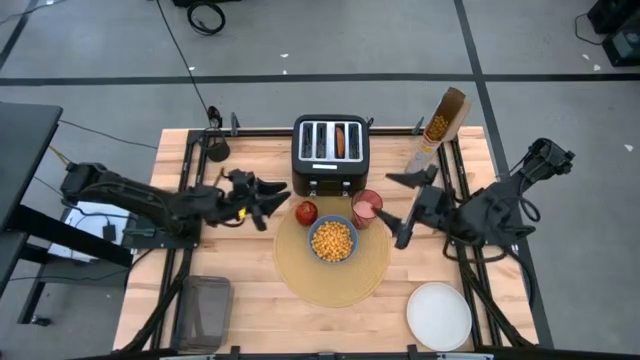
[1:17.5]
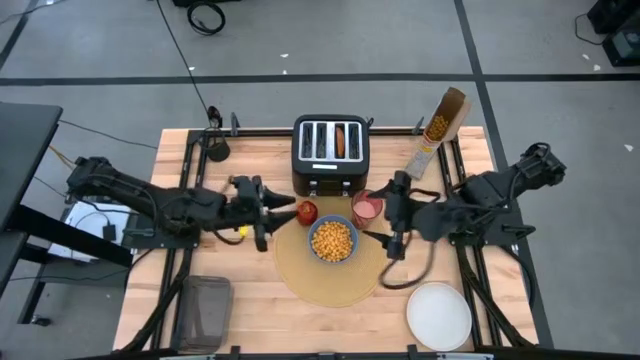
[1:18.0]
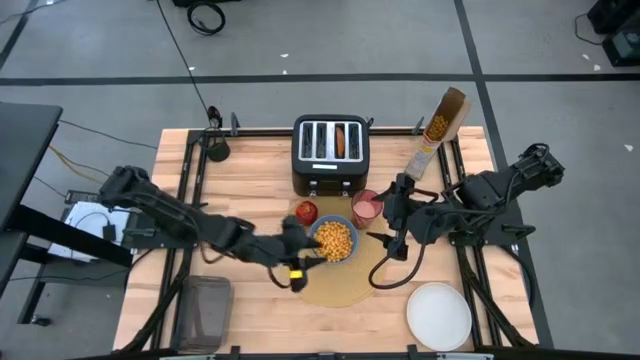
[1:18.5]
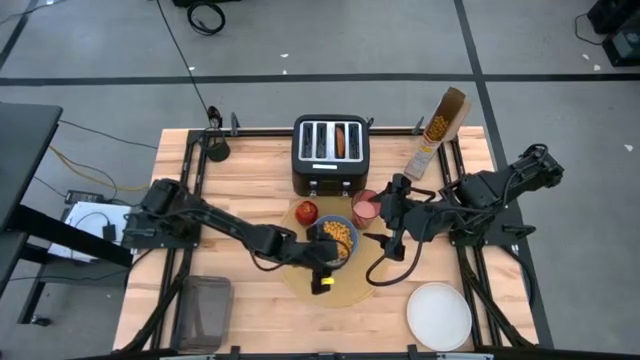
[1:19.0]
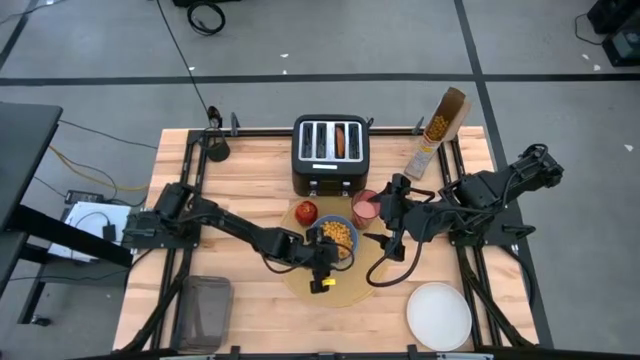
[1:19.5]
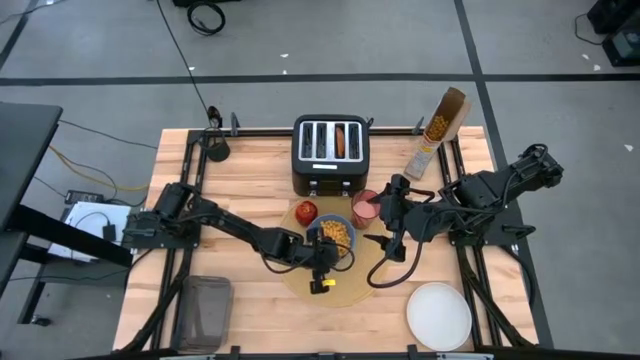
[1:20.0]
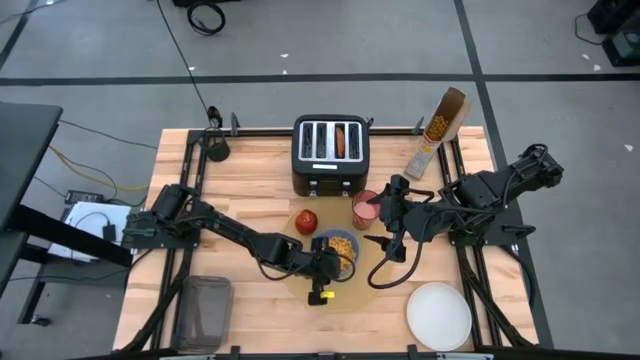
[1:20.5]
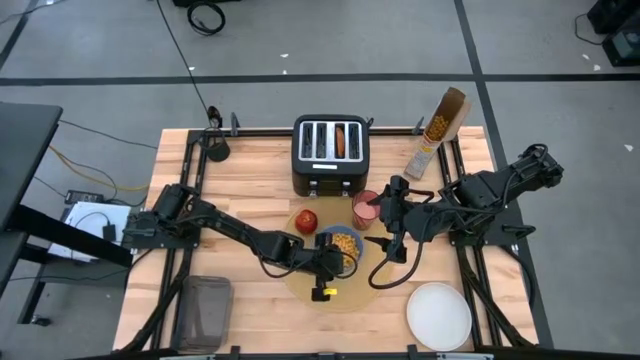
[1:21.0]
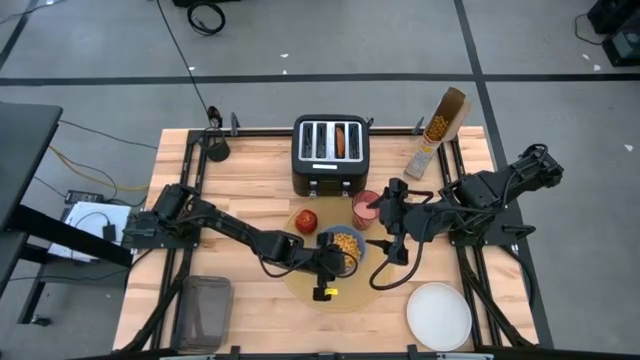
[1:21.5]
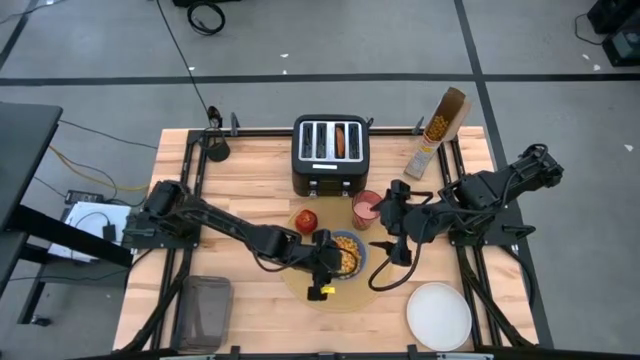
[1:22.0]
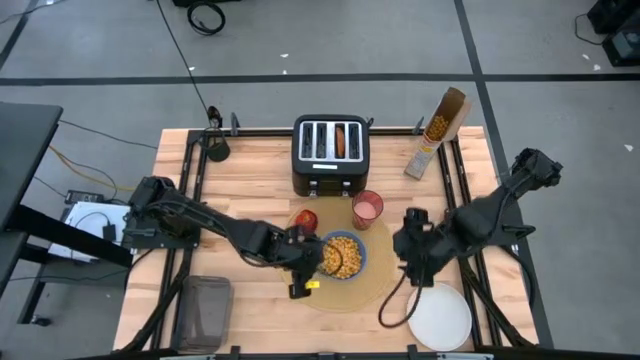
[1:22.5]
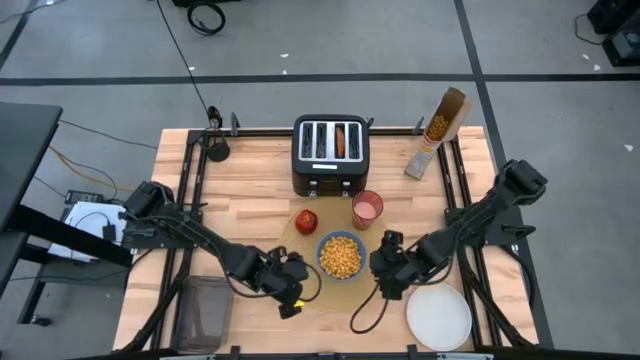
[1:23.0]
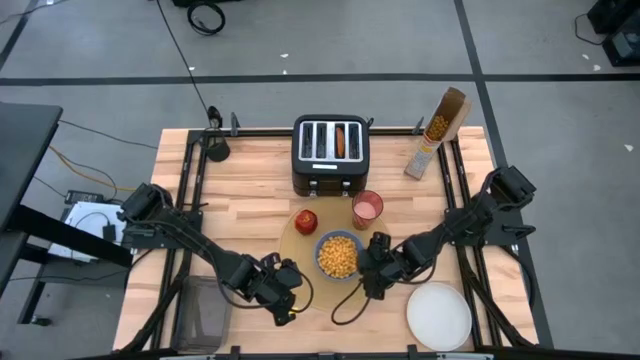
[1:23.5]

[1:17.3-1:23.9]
Task: Arrange a breakfast setting
Adjust the bowl on the yellow tablemat

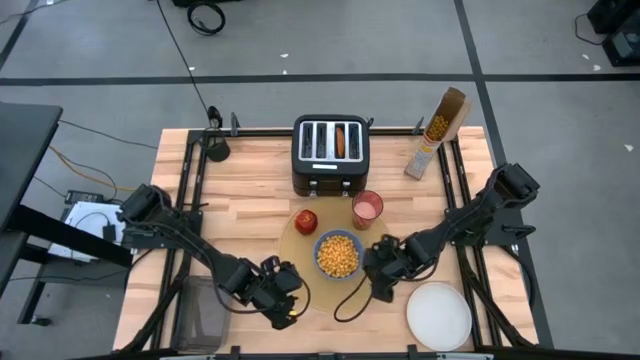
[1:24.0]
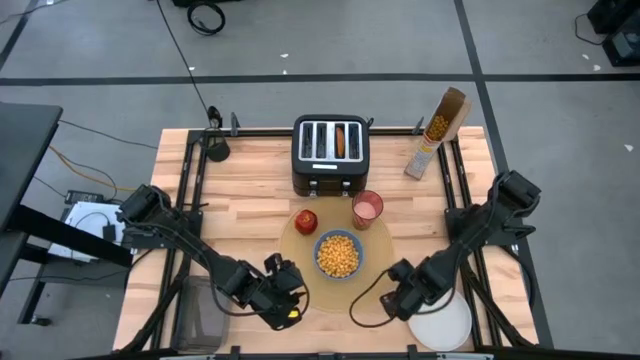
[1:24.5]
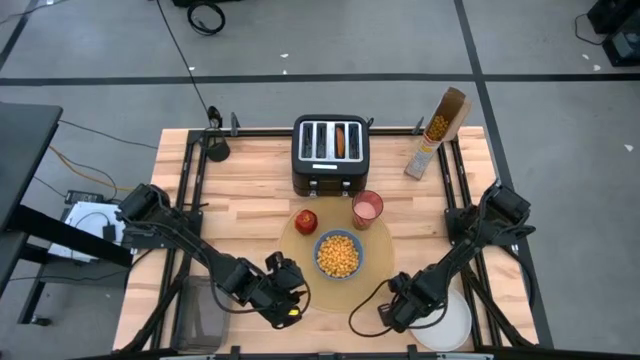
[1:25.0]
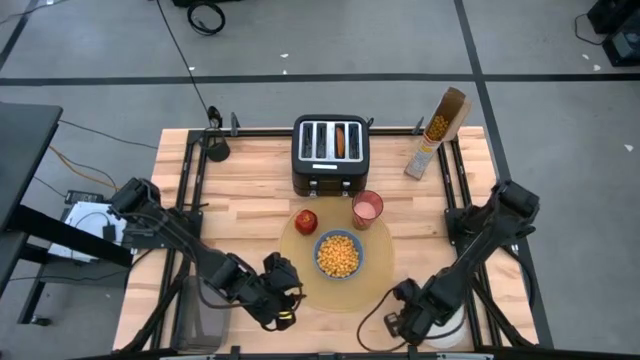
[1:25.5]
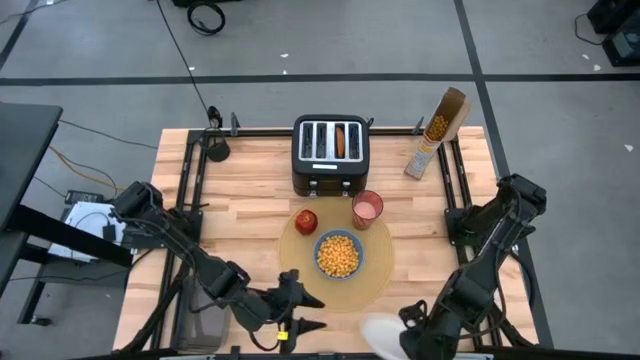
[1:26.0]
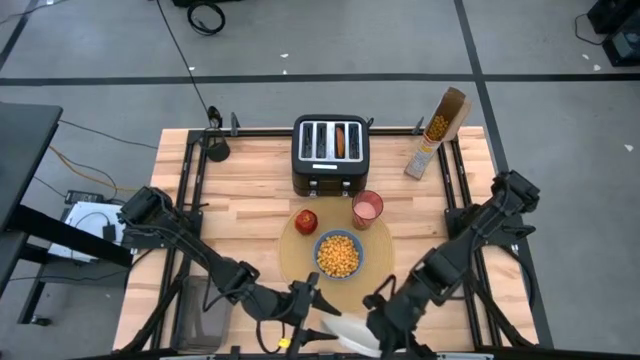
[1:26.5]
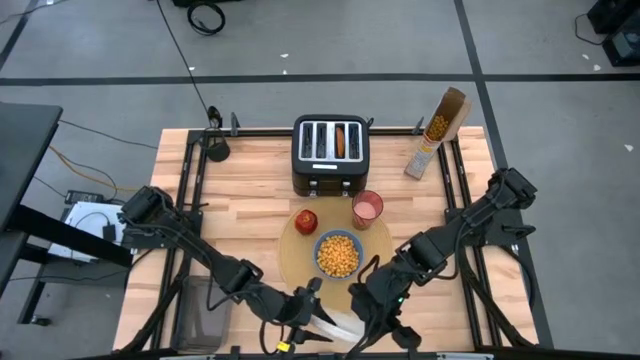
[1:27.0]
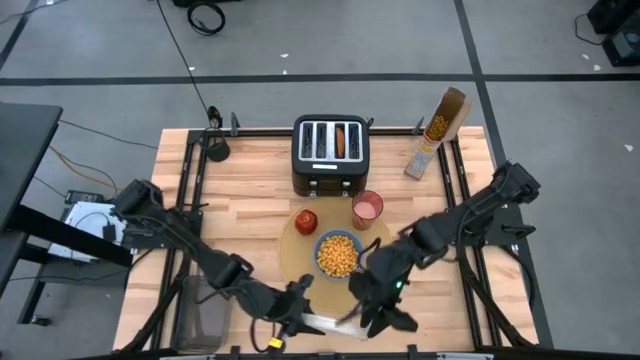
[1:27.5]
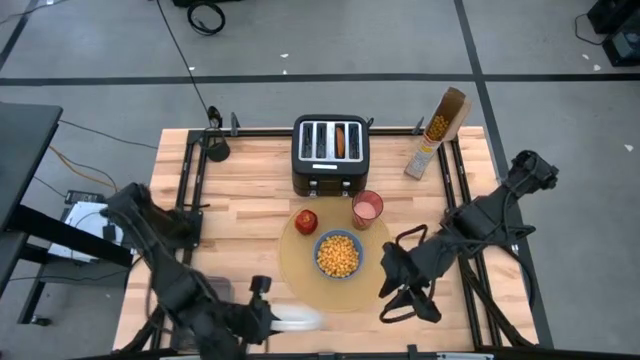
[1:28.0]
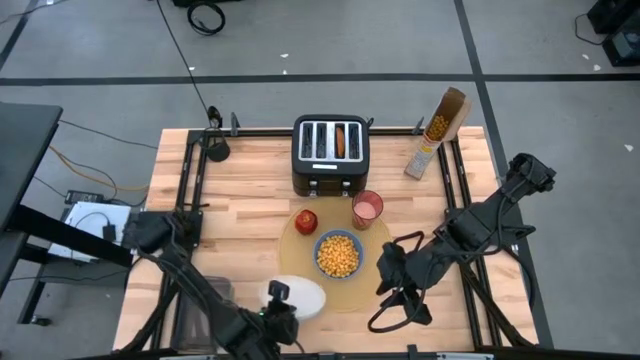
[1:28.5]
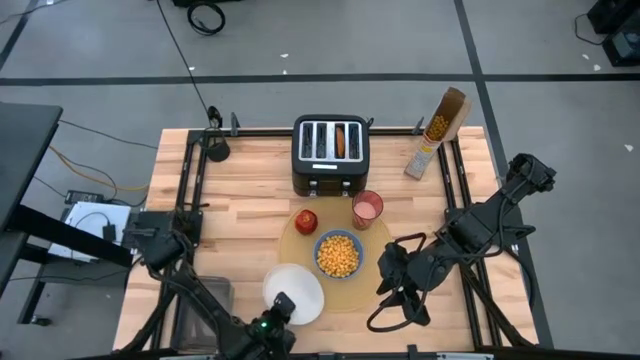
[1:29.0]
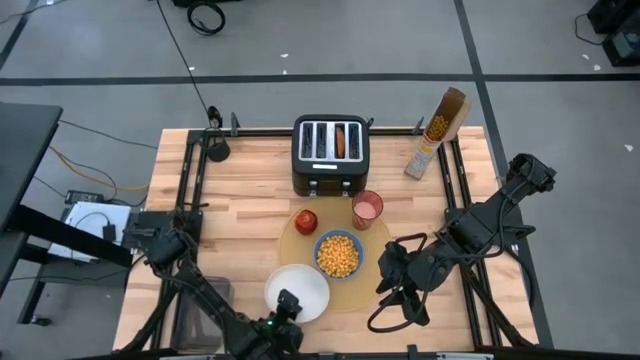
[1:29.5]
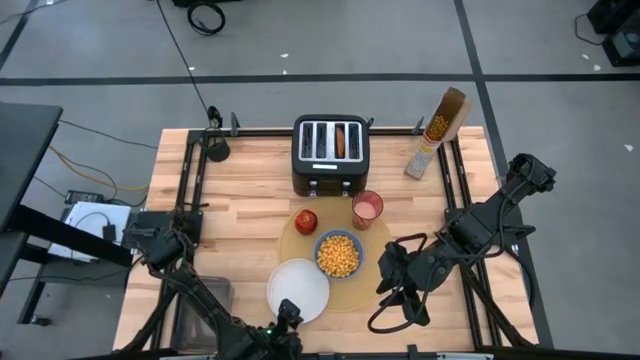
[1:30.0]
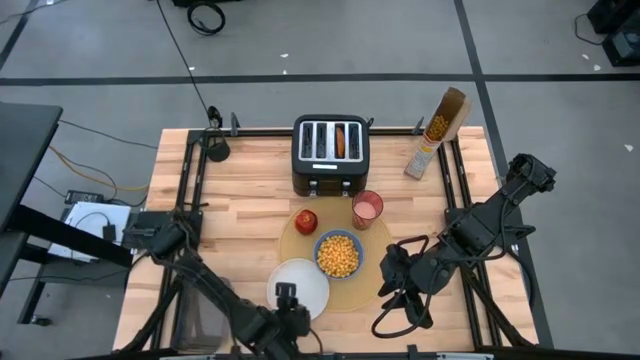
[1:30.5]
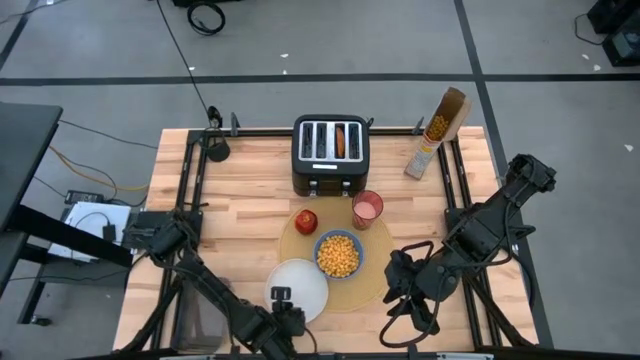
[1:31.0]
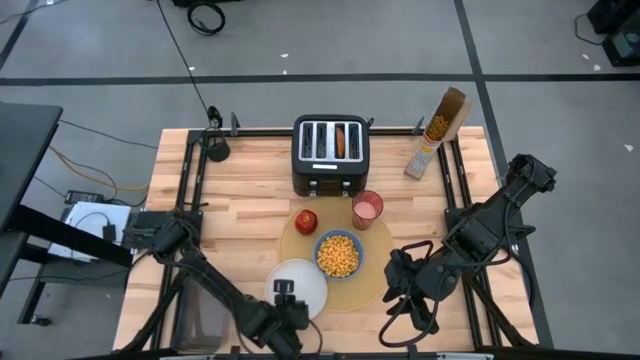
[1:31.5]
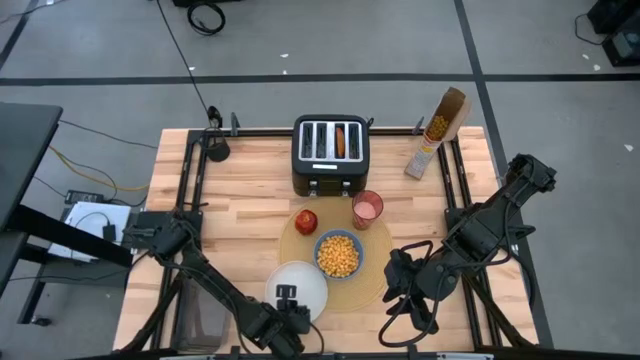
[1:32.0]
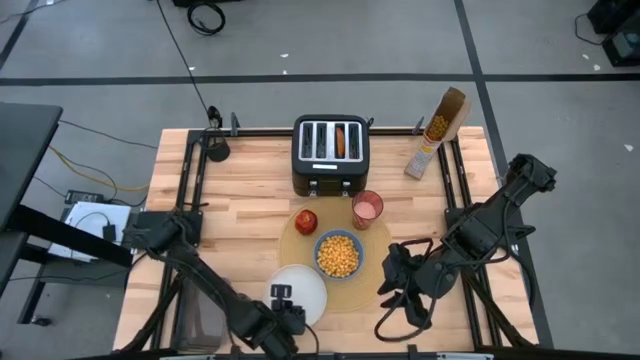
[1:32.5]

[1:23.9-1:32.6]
Put the white plate on the yellow tablemat

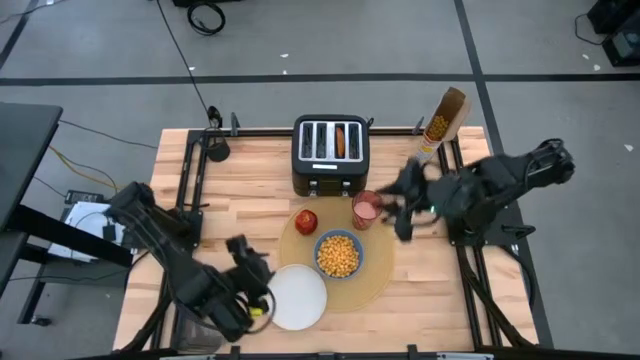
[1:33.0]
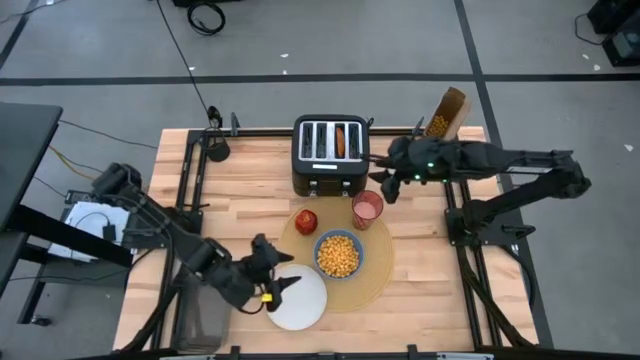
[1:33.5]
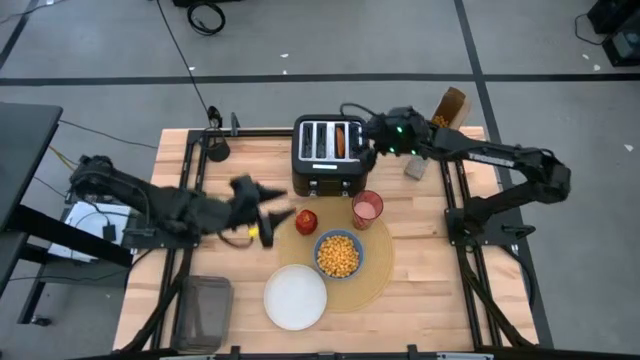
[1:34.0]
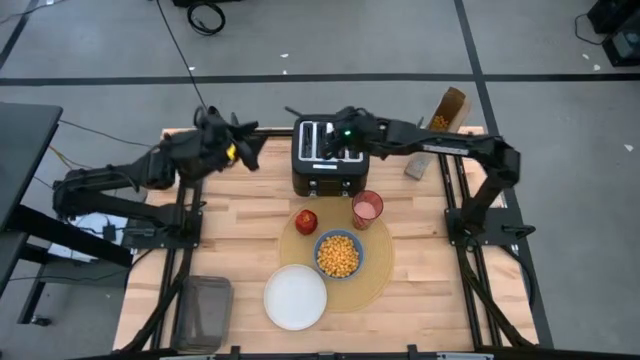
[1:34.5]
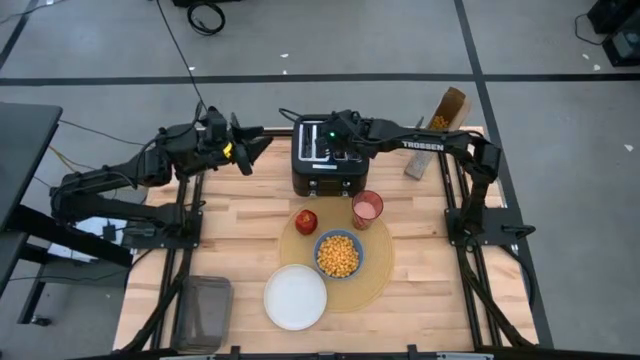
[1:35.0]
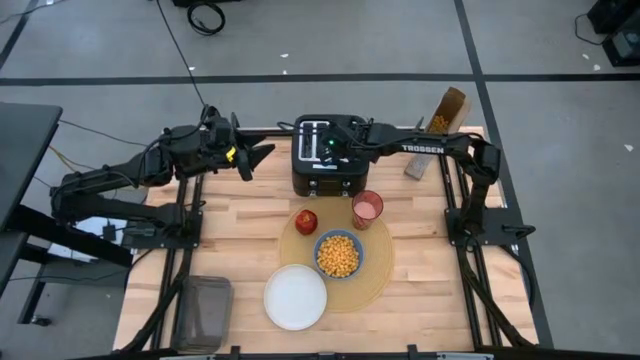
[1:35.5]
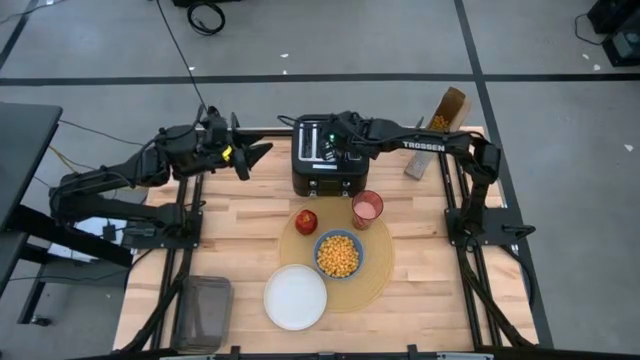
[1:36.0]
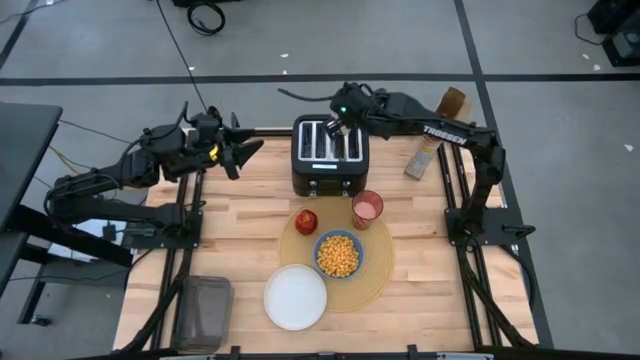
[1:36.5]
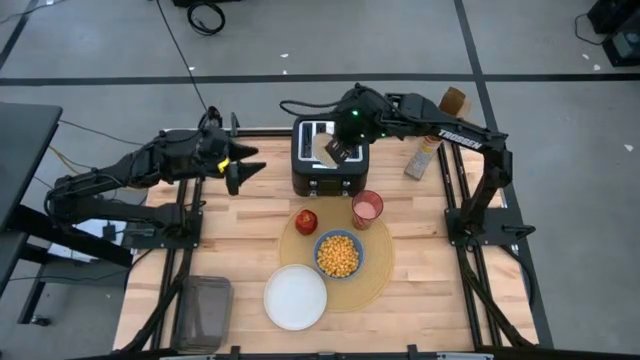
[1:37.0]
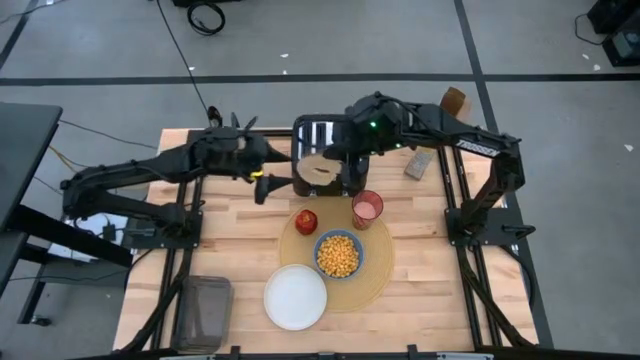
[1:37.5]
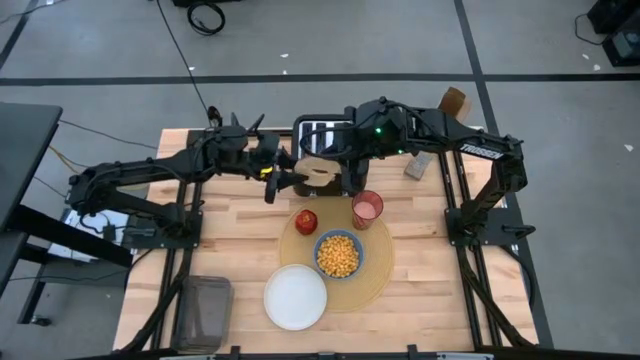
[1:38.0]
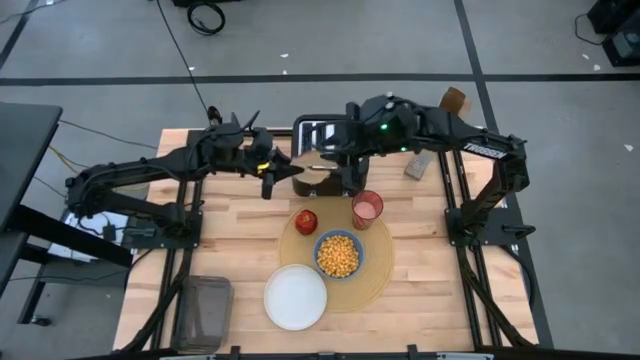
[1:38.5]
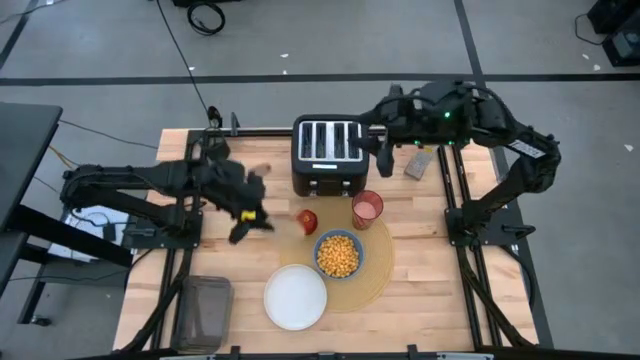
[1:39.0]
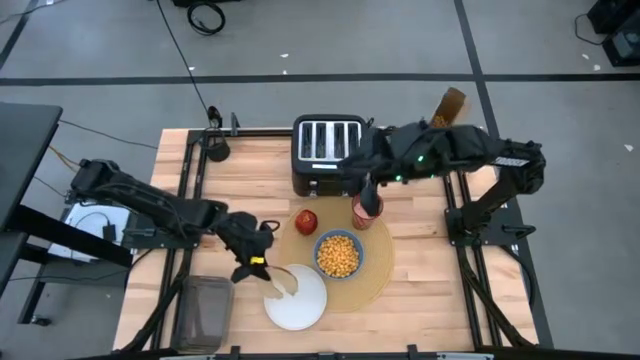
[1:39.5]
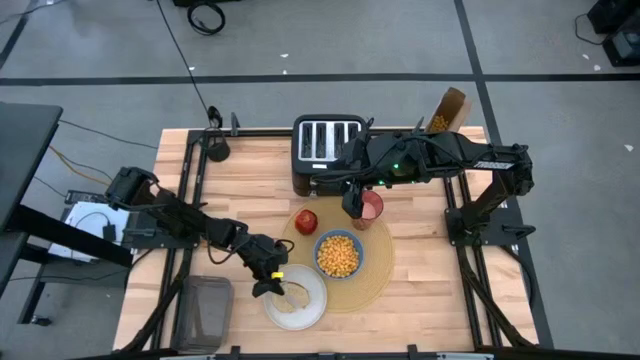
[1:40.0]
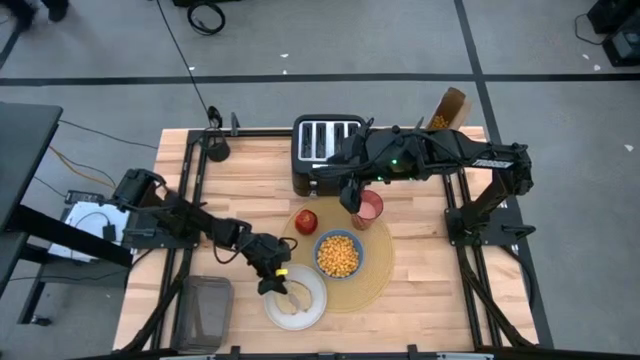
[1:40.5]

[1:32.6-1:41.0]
Put the bread on the white plate
